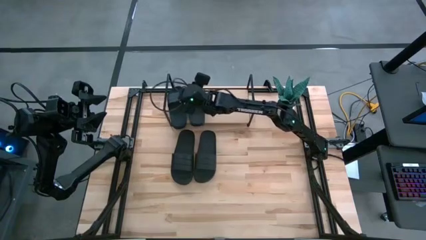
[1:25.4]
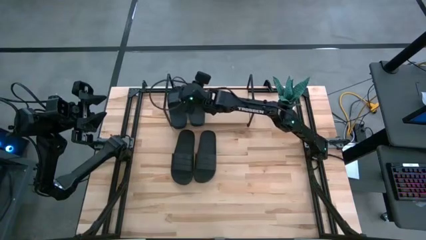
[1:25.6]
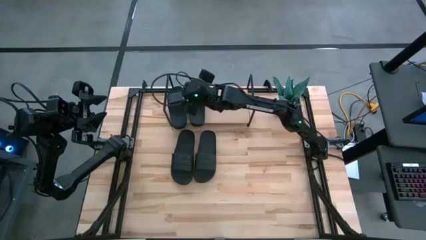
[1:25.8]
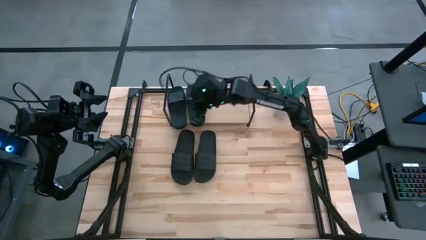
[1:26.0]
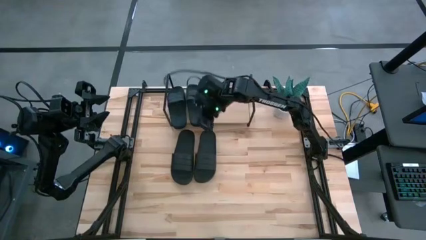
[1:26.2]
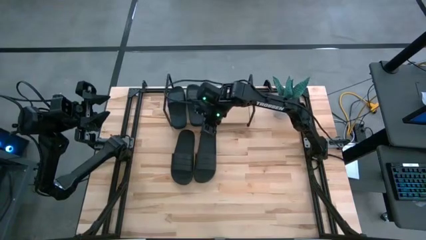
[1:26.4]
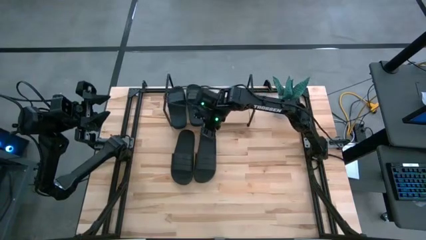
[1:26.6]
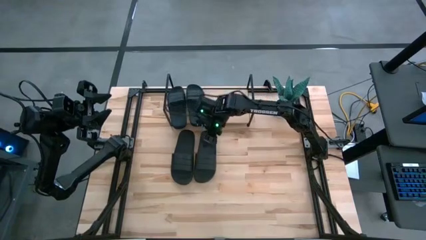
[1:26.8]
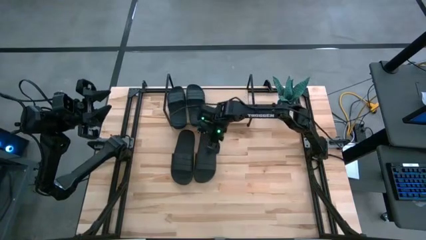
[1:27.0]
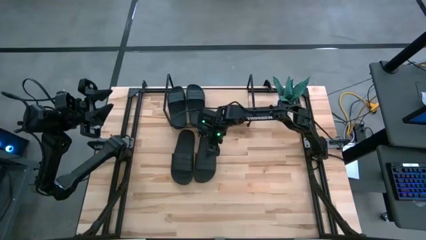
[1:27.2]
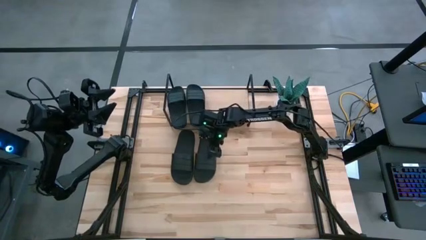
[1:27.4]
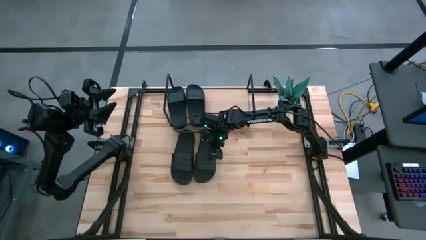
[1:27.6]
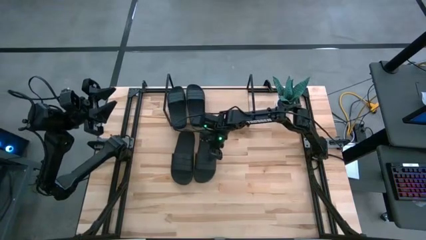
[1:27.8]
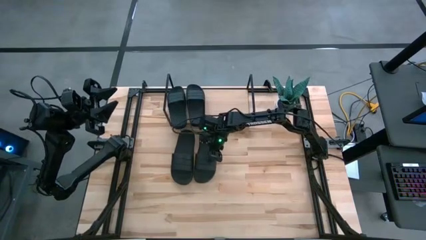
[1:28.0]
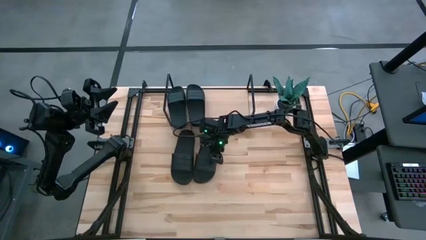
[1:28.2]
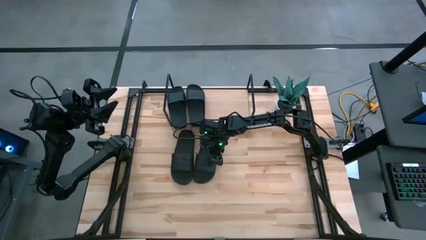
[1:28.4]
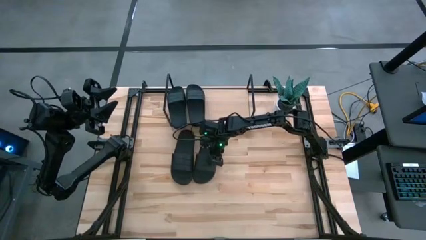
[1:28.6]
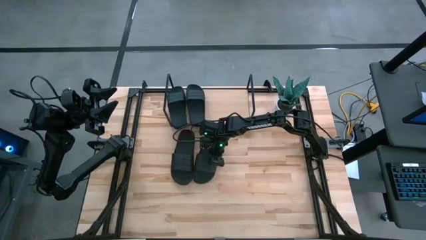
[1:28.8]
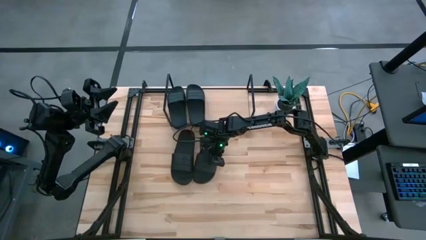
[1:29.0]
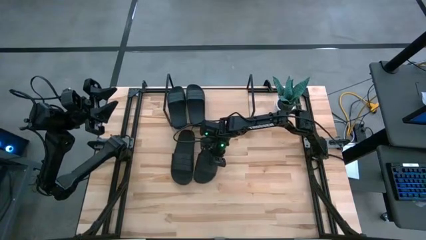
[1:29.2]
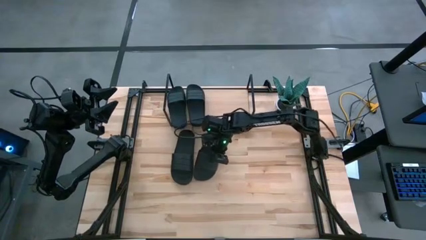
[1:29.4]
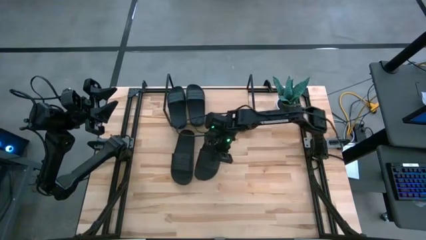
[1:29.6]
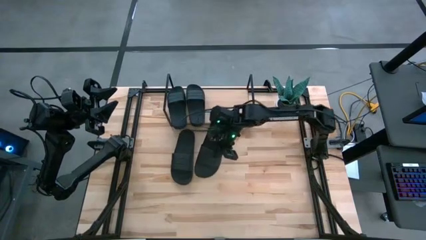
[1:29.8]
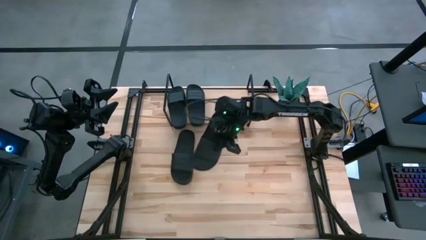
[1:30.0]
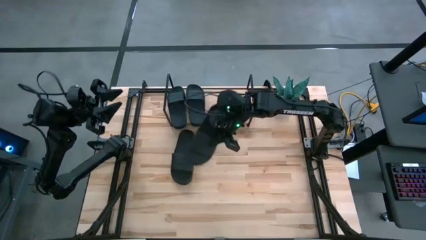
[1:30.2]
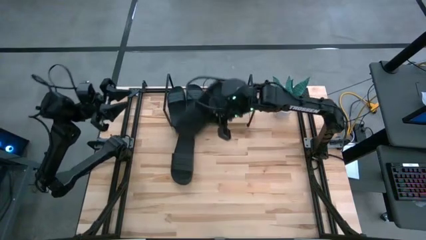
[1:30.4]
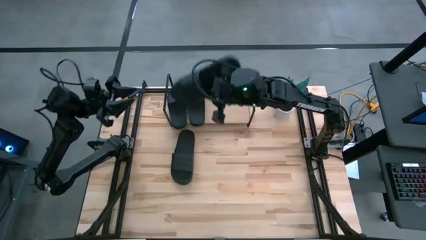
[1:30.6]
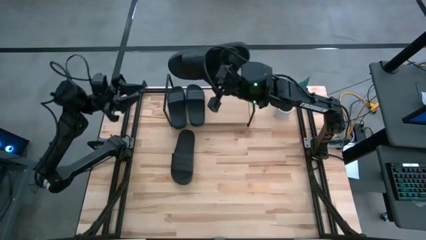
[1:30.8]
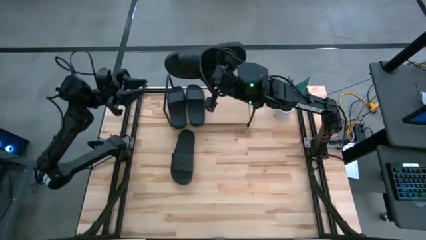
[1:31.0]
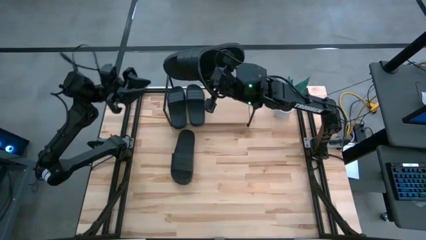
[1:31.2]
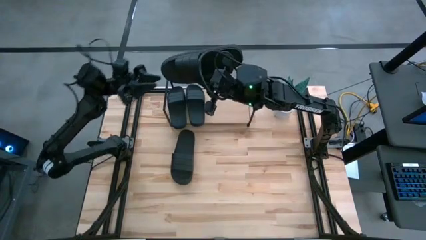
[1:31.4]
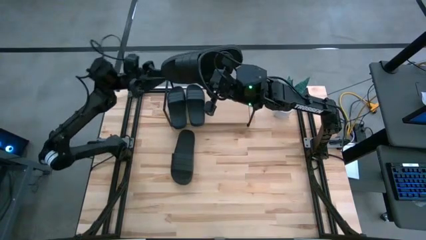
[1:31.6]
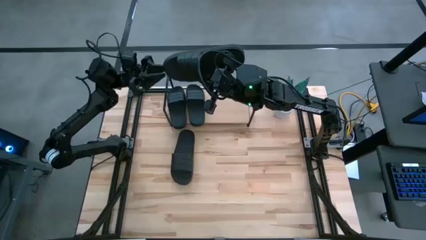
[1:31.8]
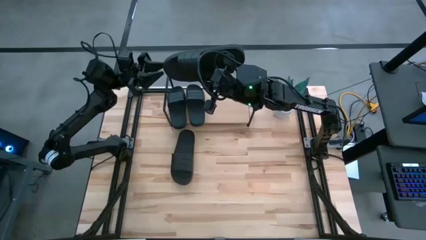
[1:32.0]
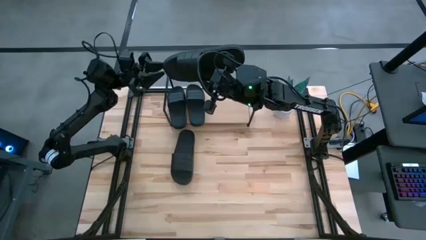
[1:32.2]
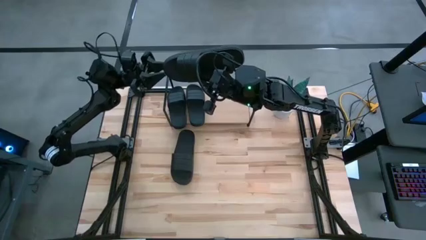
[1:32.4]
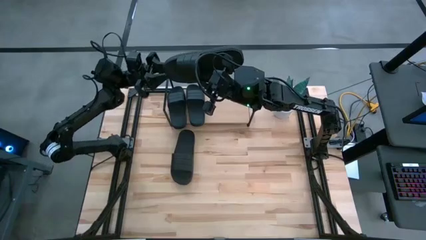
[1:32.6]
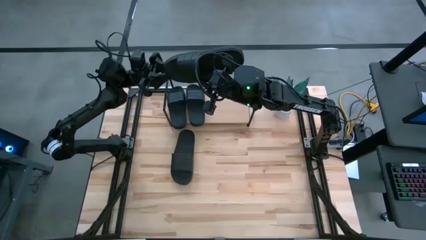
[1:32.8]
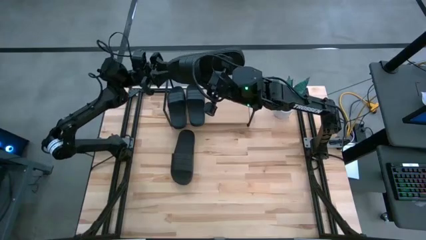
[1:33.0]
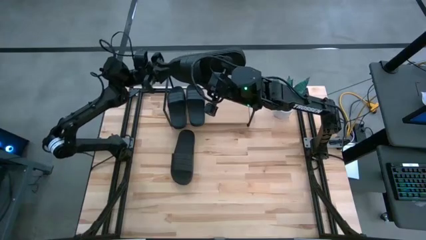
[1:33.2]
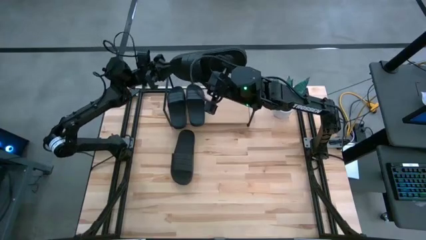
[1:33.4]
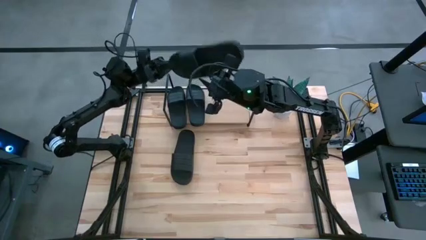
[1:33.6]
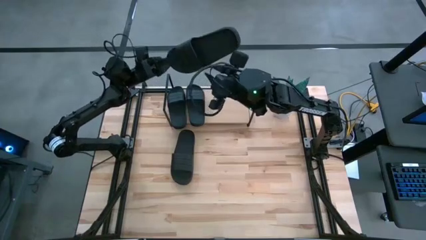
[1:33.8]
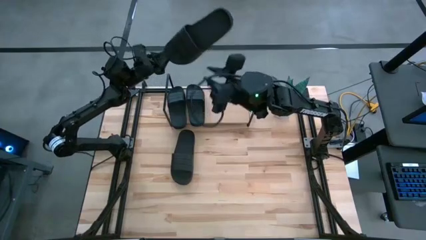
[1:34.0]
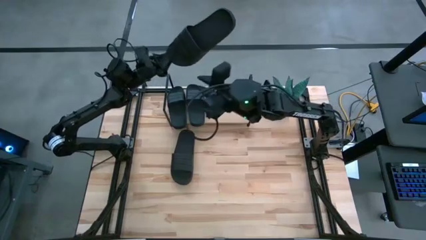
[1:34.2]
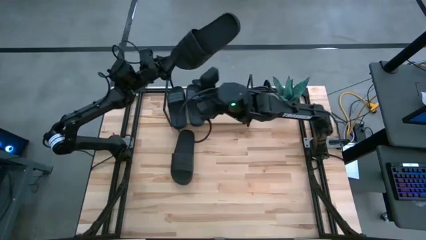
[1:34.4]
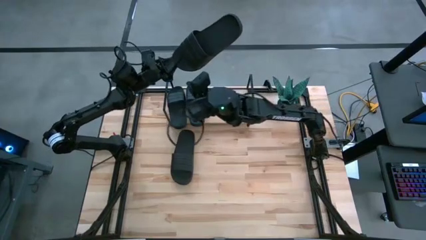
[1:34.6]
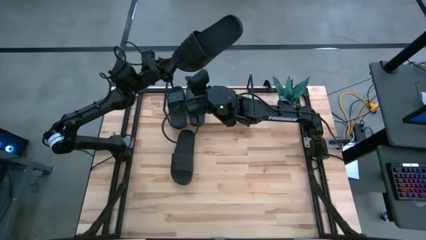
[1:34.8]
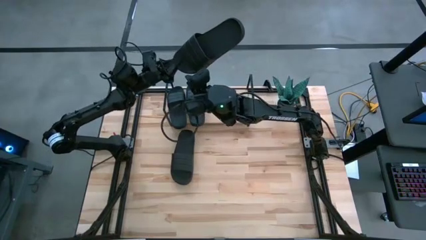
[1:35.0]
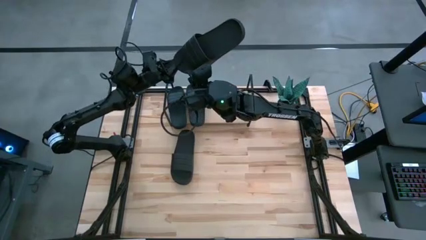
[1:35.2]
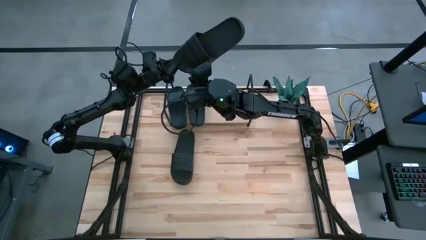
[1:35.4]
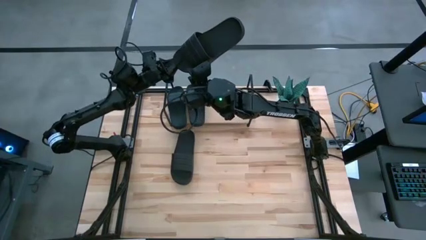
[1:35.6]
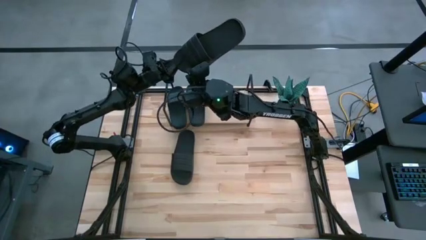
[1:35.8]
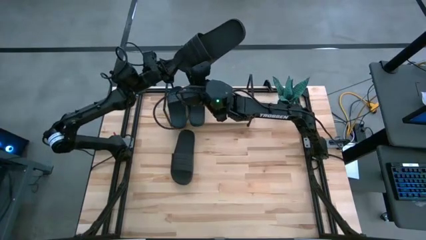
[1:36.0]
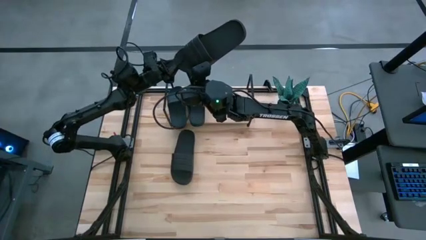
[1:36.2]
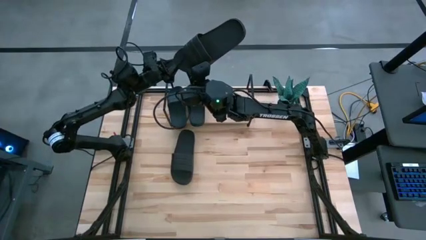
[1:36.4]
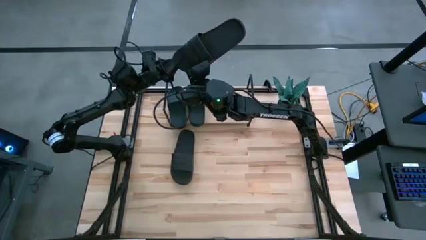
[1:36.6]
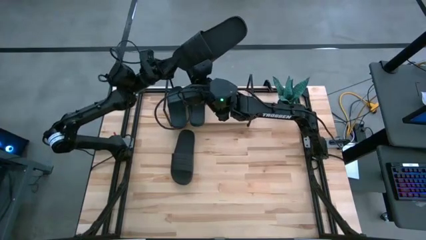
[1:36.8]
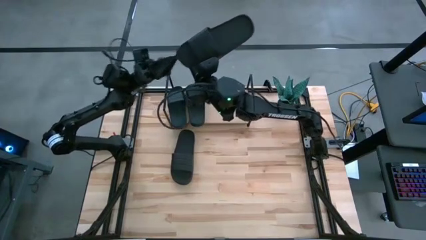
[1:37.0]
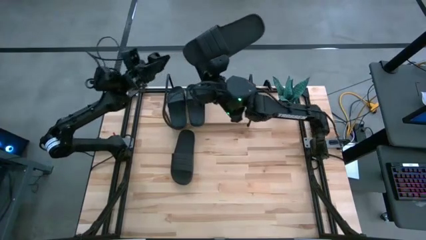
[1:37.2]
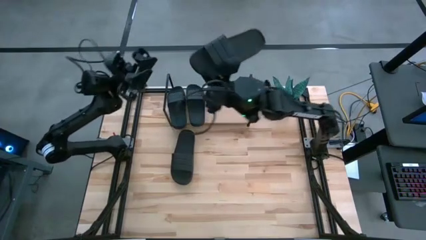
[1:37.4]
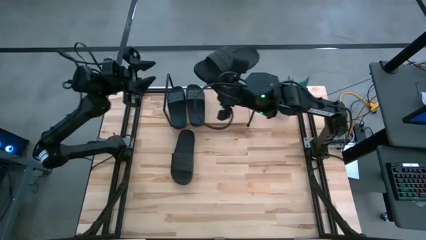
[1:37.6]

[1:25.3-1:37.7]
Task: Pick and place slides into the shelf
Put the right black slide on the shelf

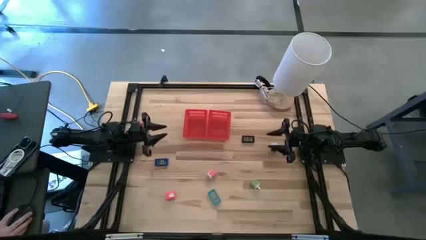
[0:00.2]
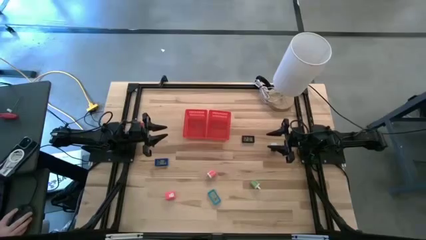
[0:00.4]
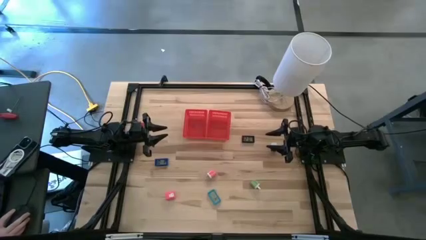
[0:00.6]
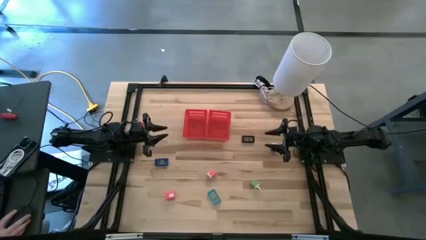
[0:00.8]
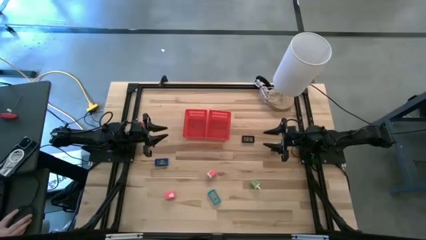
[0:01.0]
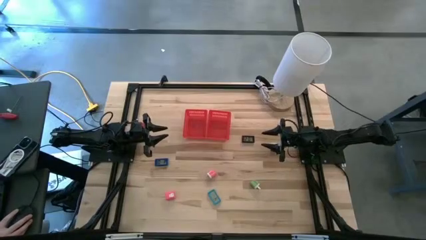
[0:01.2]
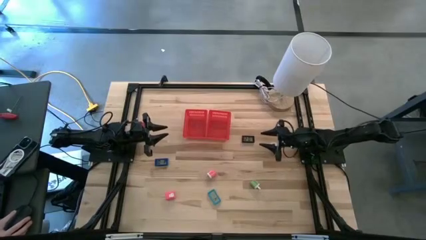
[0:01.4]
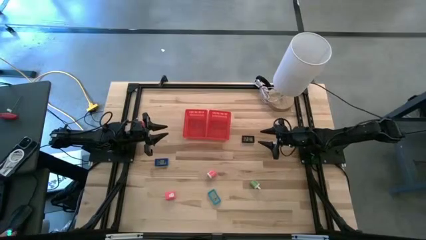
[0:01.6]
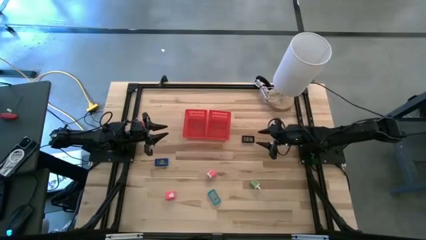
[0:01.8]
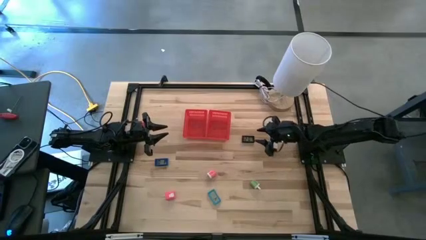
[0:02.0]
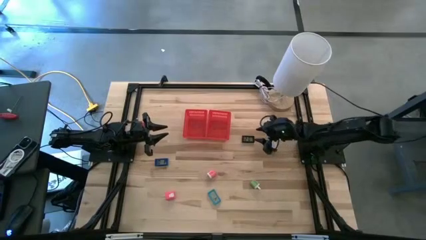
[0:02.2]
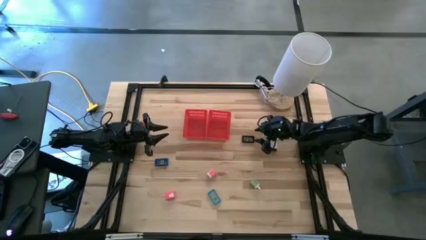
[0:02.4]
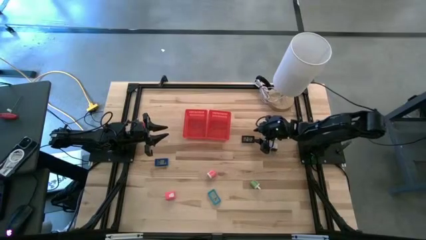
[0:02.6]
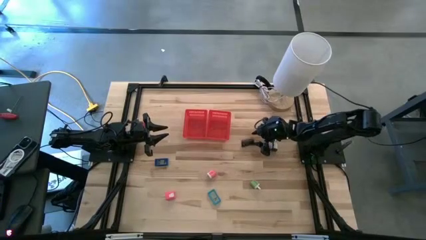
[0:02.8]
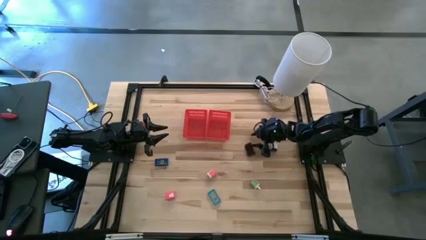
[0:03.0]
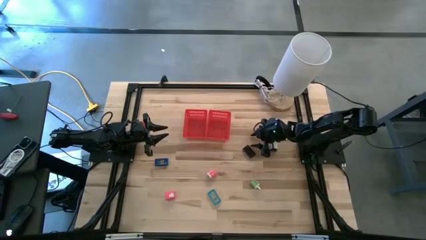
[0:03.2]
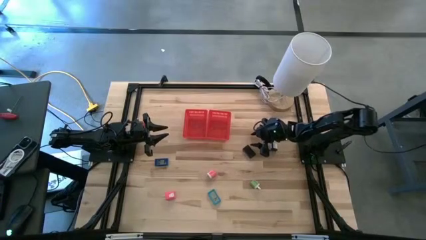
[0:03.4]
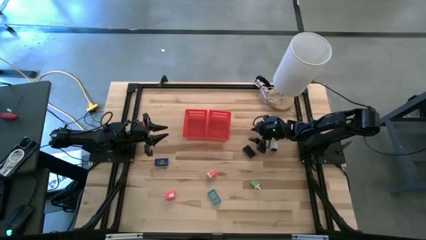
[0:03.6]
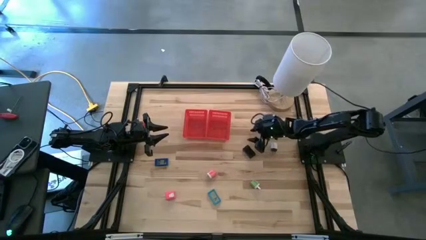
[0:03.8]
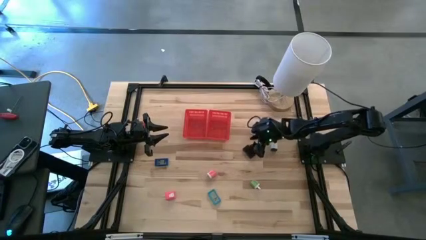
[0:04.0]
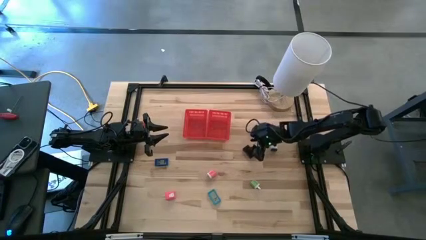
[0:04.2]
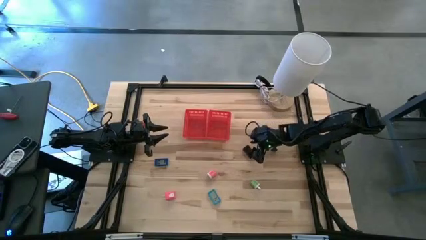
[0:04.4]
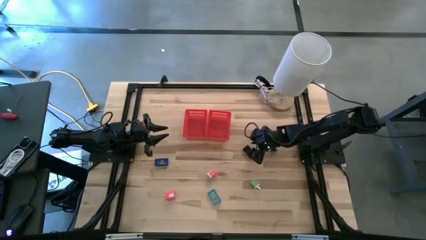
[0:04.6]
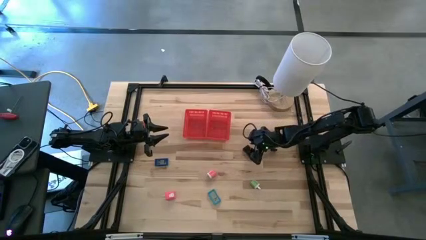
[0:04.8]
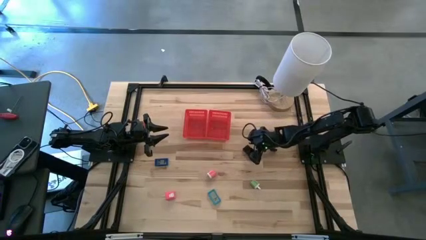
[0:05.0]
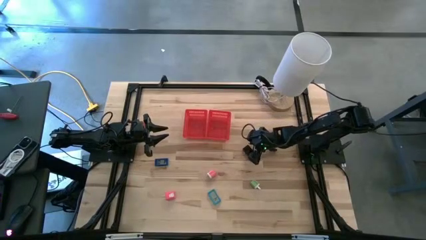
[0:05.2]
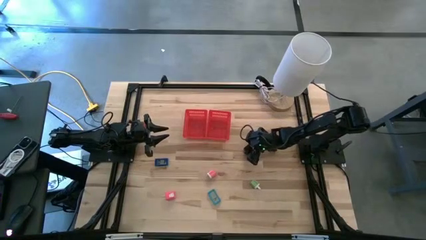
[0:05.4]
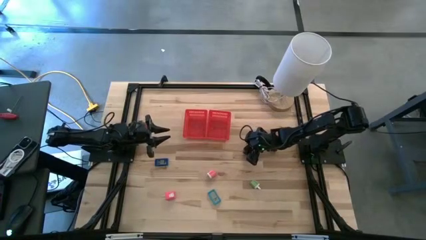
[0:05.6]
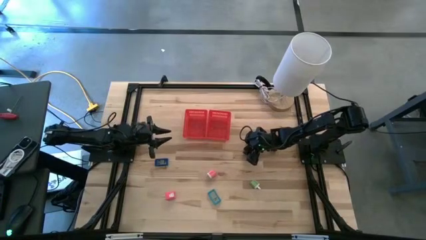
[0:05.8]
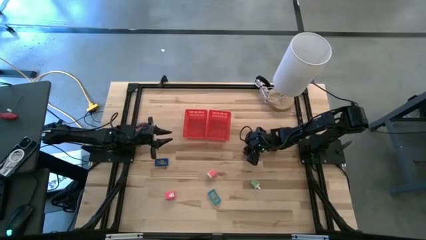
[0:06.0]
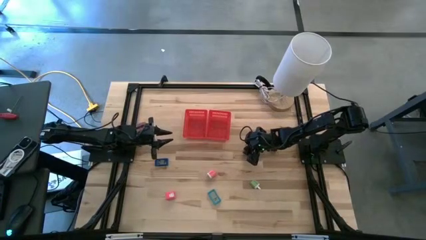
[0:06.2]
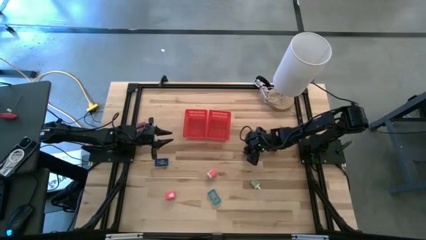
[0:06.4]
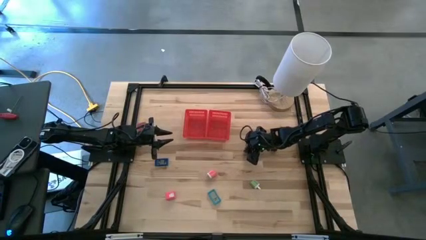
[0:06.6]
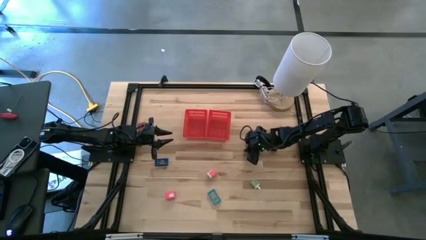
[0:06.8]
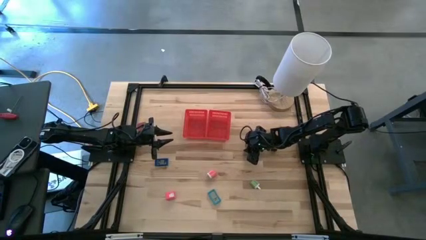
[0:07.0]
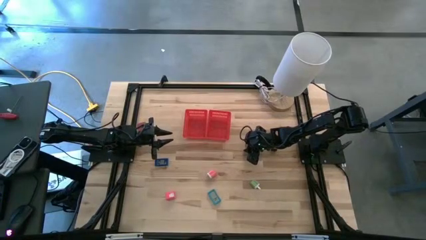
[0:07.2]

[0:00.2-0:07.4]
Task: Pick & Place Office items
Put the black digital clock into the right red bin
